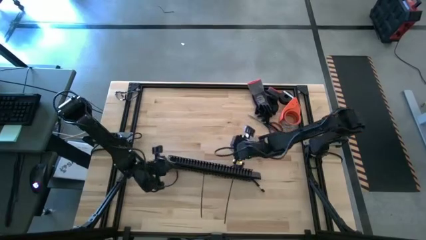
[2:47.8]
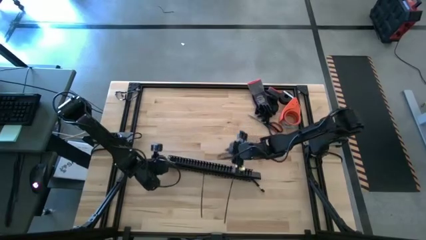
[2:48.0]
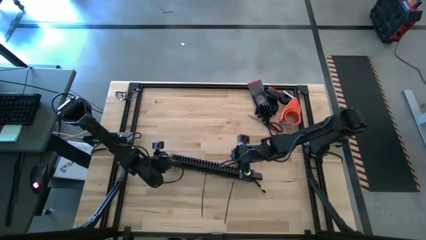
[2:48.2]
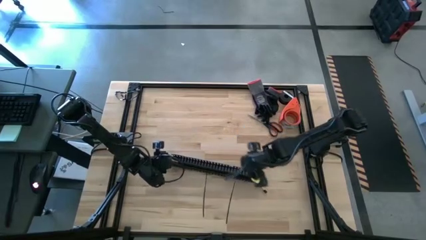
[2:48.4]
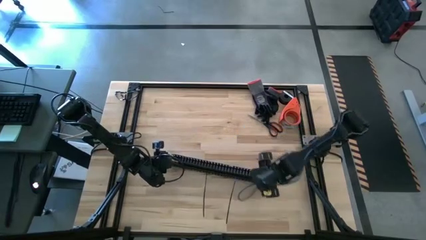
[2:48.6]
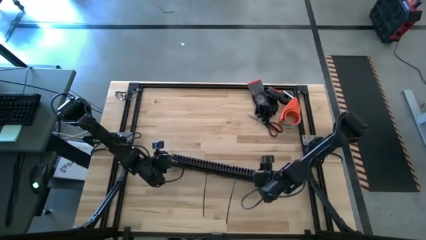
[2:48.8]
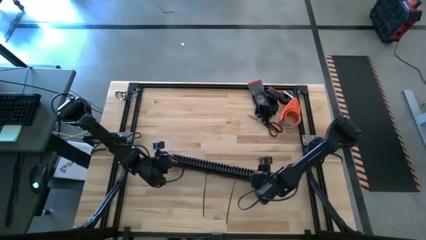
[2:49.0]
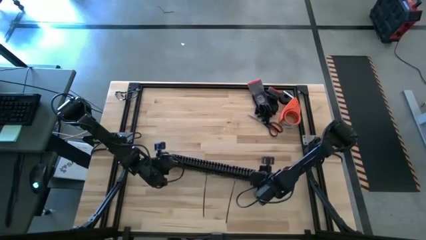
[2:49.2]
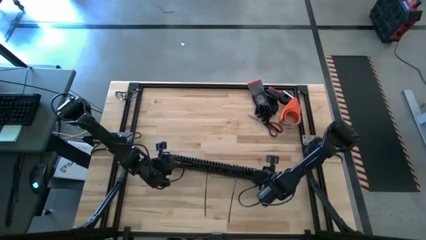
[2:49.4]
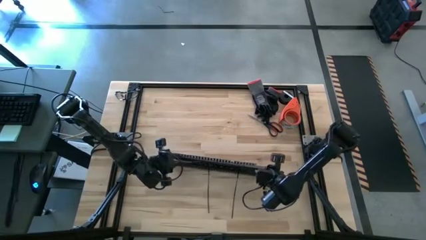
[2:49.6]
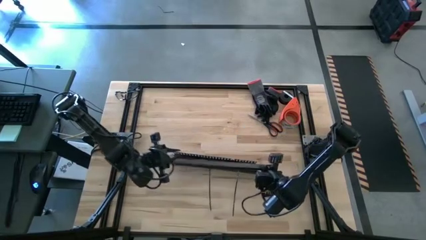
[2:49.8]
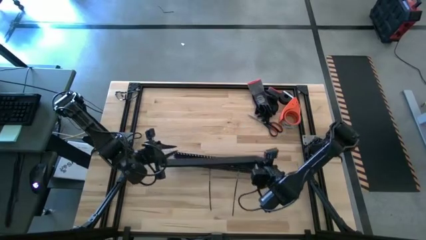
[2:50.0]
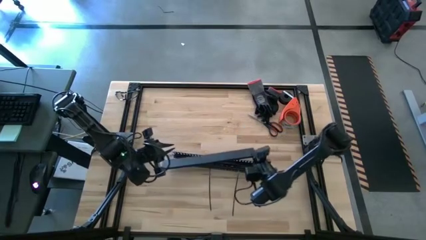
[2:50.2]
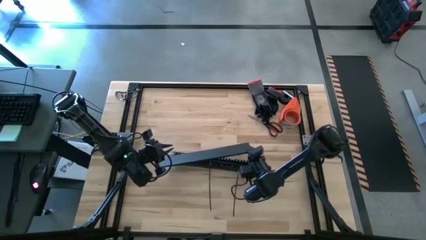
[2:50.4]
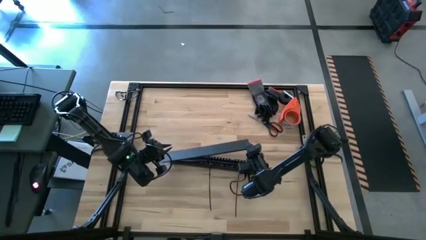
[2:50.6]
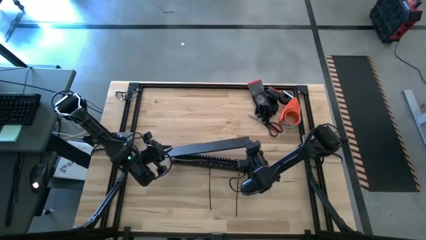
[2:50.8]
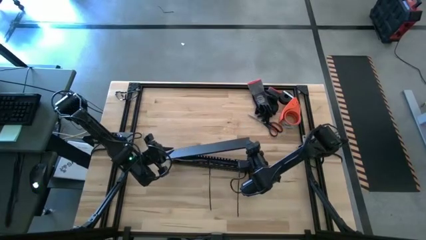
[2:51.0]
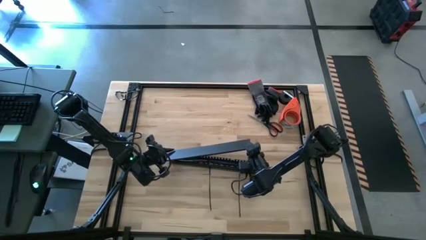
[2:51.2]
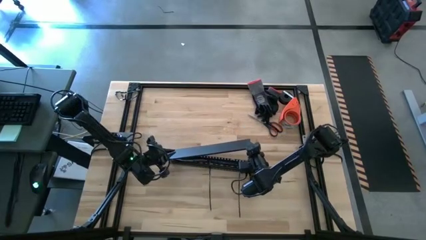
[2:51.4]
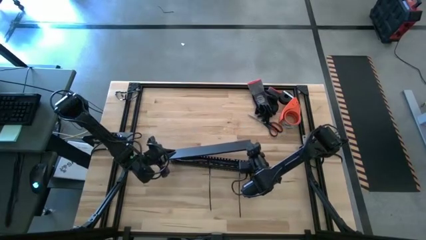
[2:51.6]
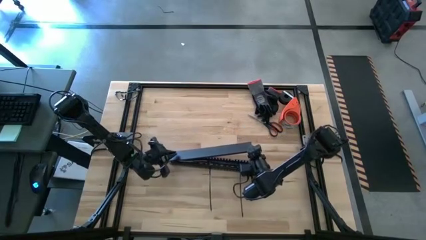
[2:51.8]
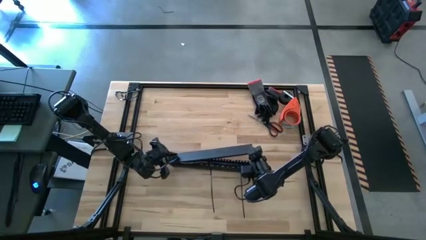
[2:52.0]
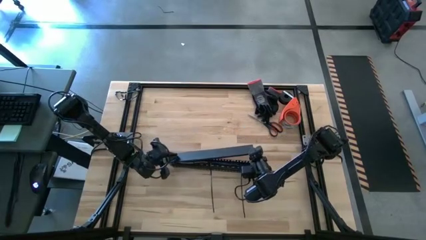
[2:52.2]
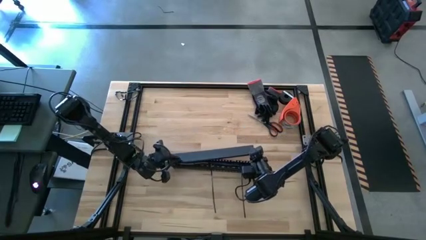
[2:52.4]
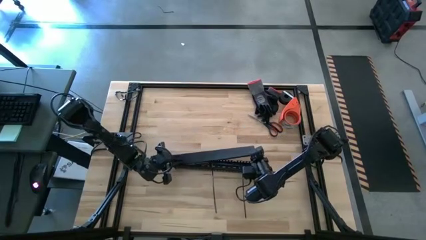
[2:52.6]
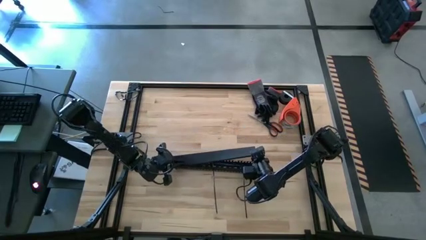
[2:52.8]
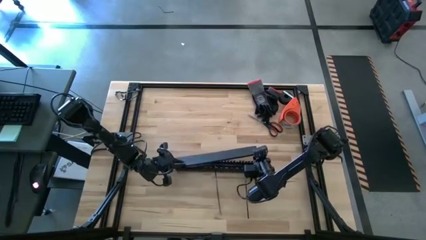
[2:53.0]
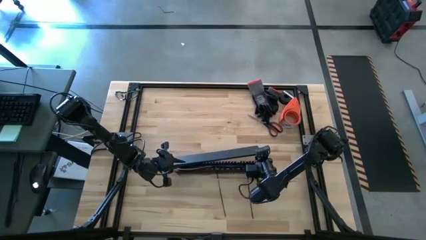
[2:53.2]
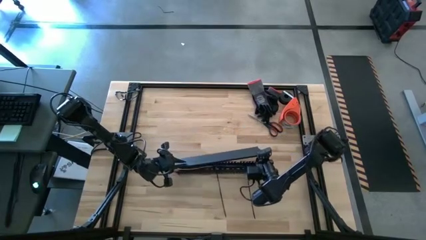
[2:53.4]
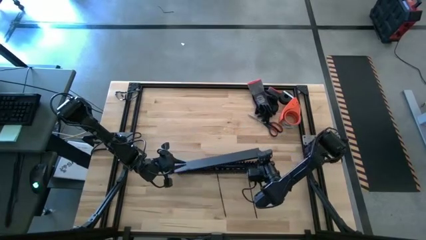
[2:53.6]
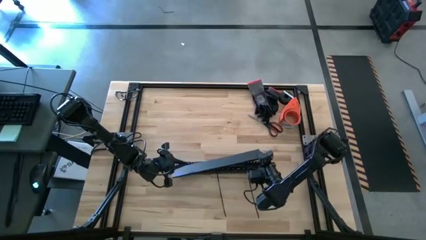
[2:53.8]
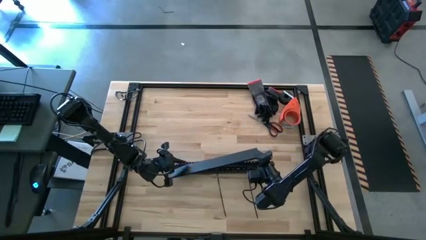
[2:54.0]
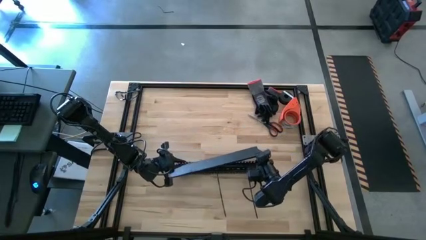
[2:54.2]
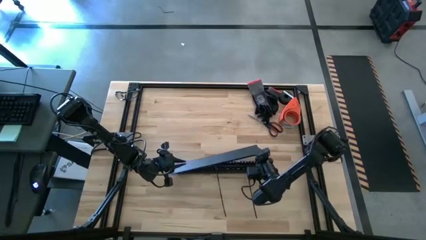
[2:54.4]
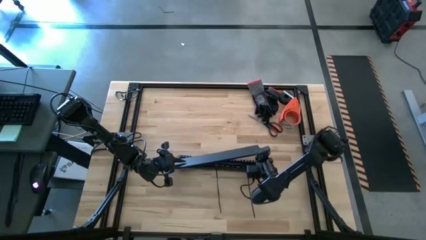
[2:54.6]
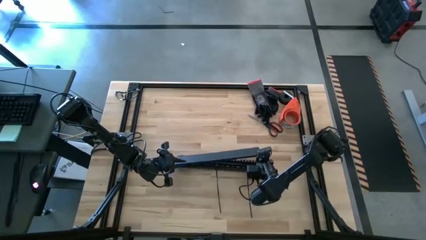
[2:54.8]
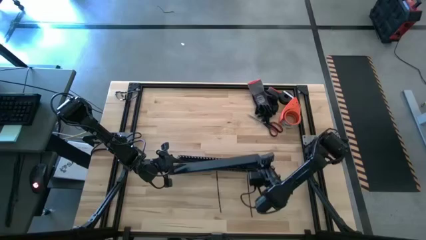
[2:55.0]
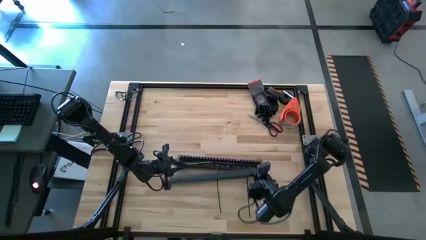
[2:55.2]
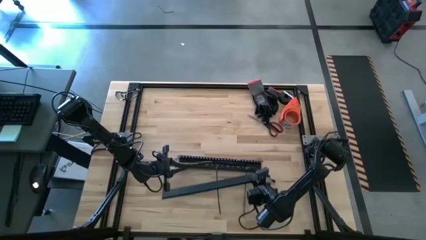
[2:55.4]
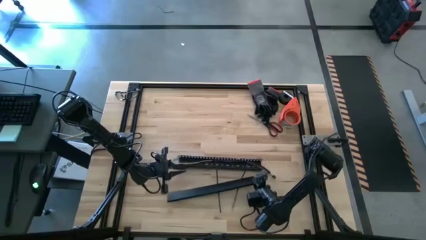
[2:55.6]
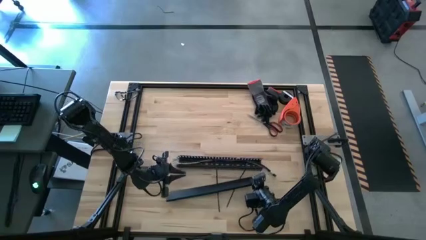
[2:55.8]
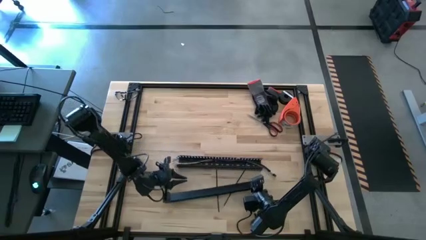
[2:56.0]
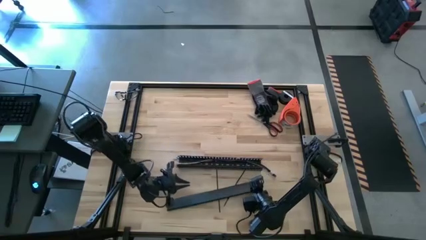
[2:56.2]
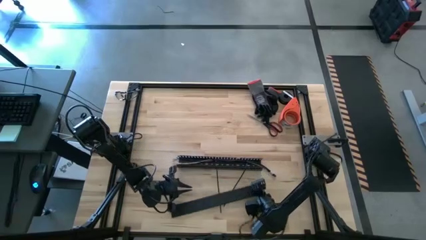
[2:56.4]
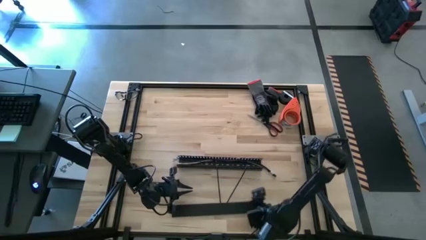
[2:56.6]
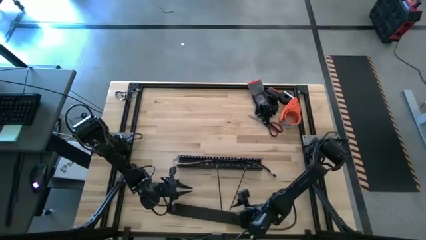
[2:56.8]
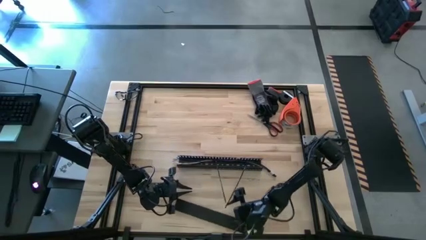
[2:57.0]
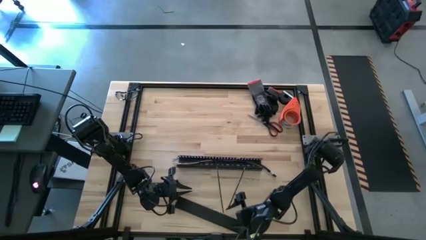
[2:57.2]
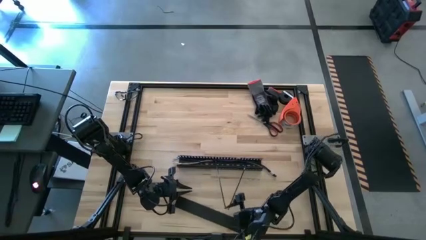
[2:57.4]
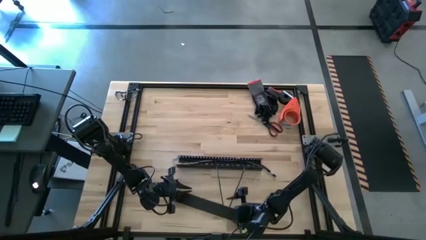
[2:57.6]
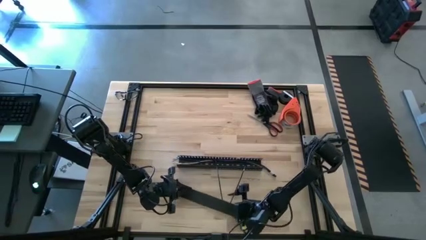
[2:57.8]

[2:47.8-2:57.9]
Task: Ziptie cables
Close the black cable duct cover

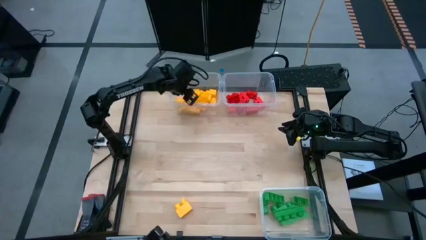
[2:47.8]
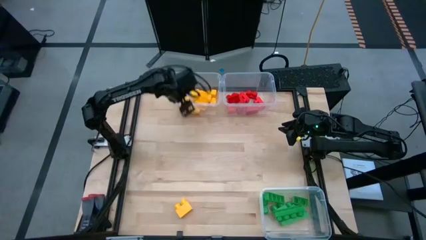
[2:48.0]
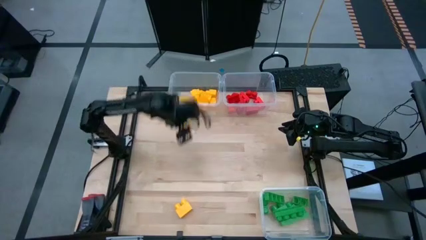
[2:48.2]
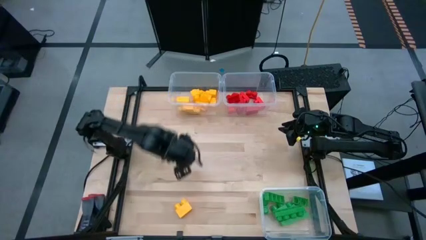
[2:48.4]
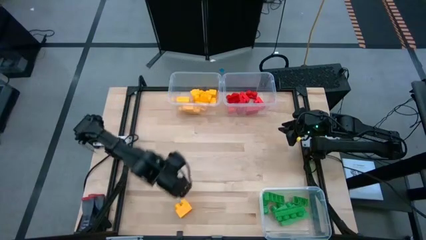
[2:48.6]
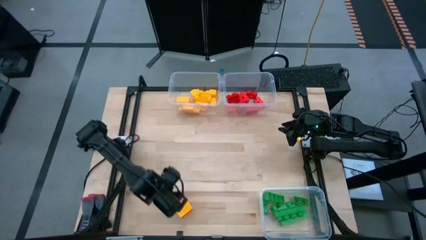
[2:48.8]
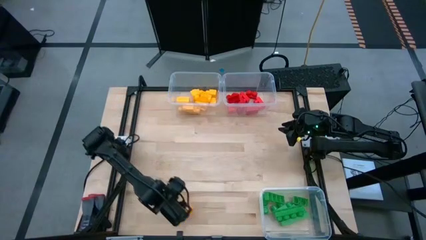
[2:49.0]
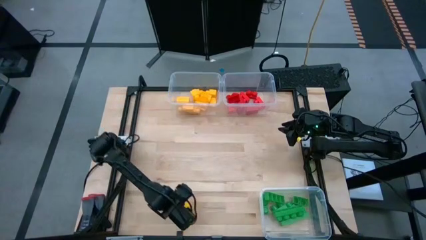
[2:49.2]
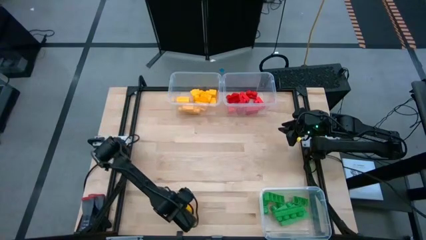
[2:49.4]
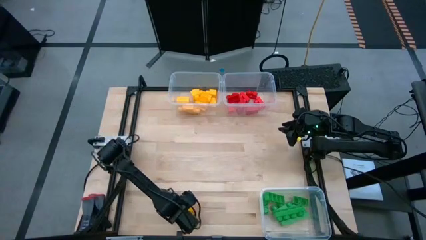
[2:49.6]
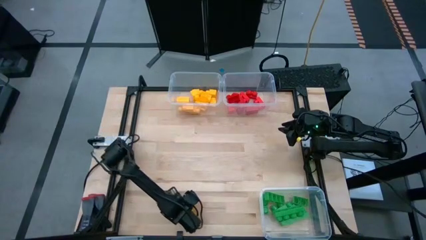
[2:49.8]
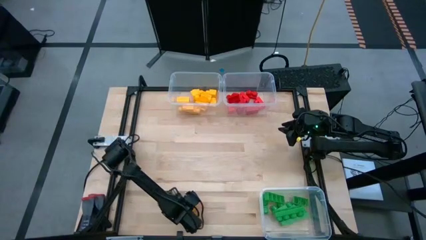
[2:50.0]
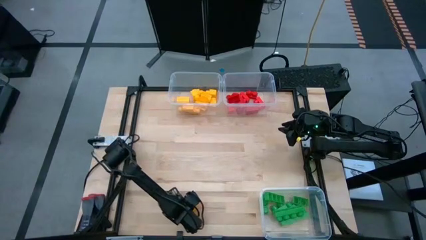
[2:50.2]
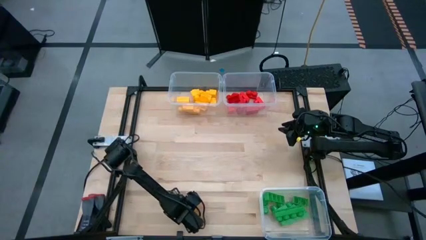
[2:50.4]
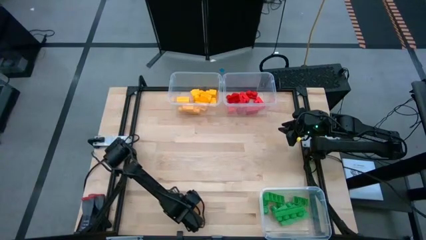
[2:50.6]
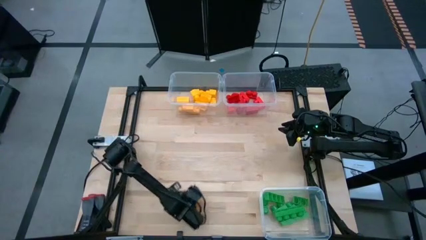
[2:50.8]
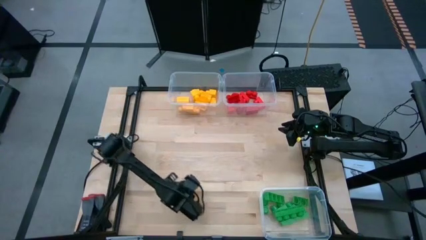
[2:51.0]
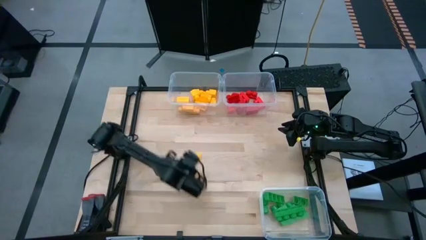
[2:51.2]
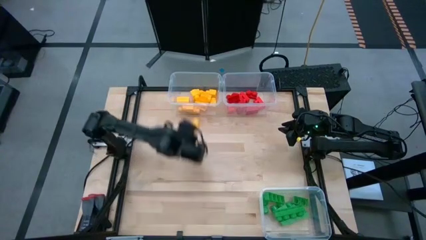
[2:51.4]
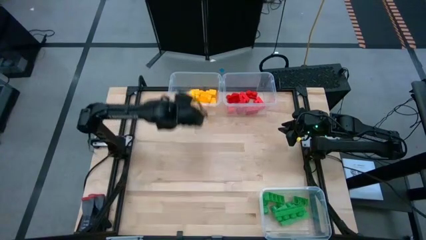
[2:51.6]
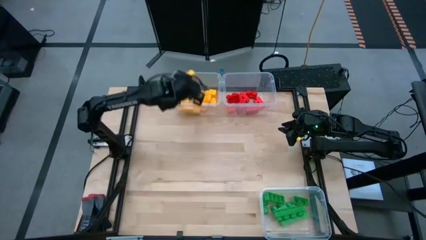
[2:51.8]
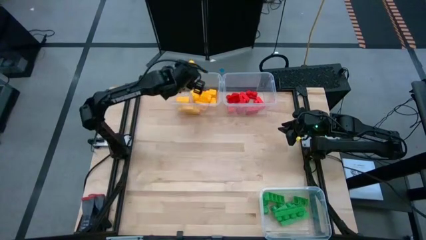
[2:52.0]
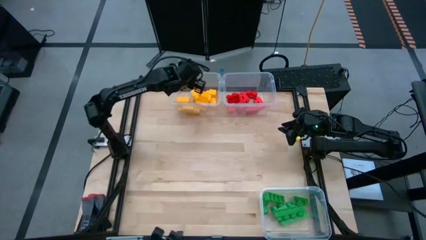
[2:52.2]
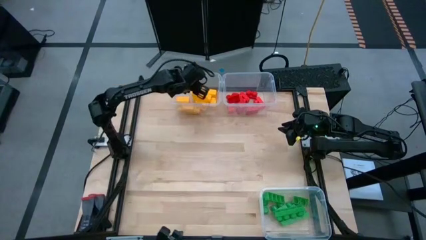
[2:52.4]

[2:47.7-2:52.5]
Task: Sort blocks
Put the yellow game piece into the top left transparent bin
